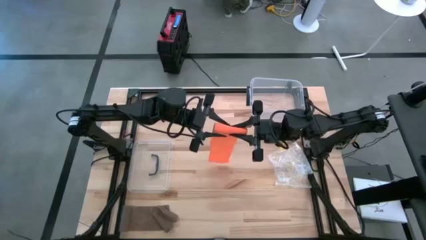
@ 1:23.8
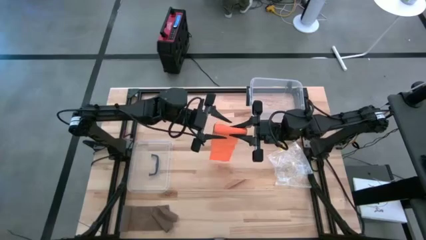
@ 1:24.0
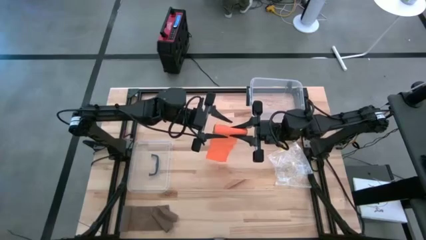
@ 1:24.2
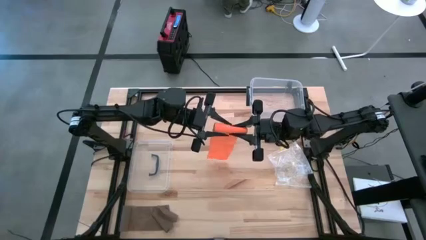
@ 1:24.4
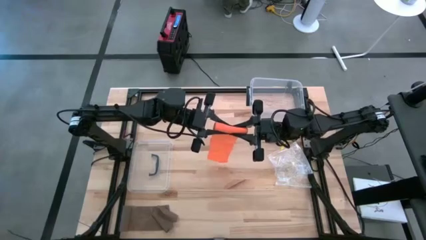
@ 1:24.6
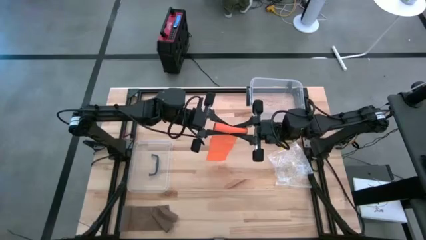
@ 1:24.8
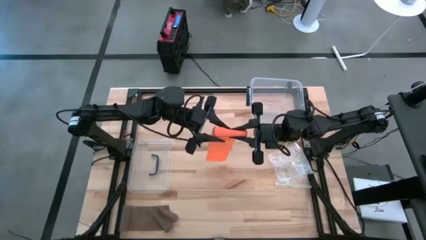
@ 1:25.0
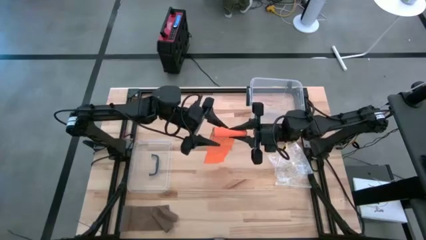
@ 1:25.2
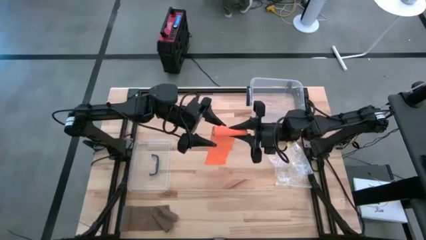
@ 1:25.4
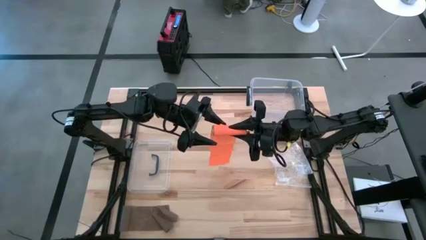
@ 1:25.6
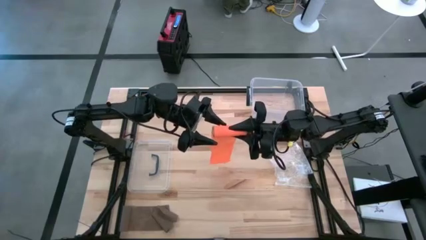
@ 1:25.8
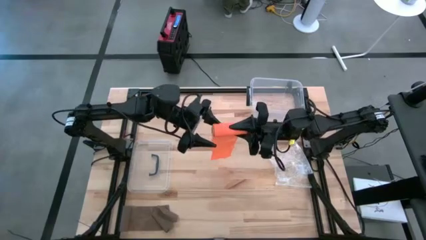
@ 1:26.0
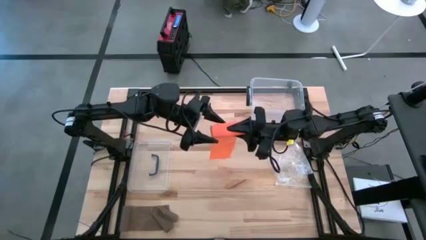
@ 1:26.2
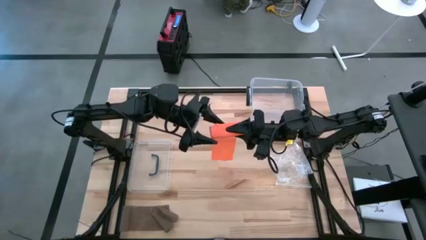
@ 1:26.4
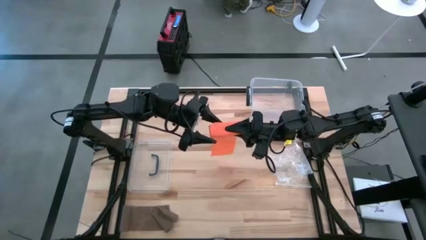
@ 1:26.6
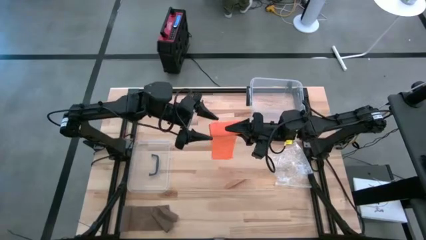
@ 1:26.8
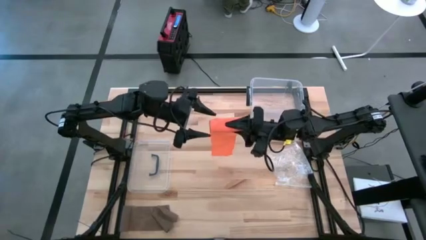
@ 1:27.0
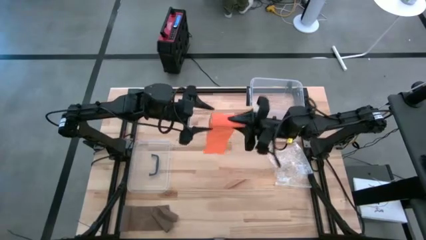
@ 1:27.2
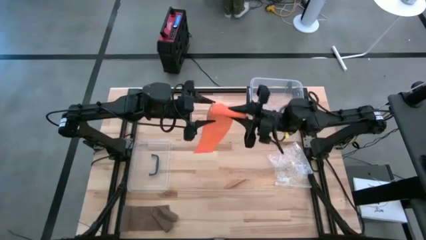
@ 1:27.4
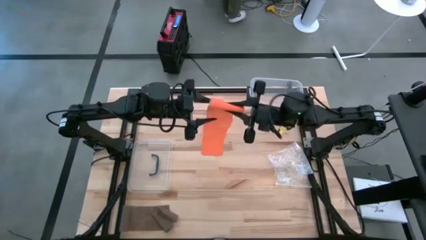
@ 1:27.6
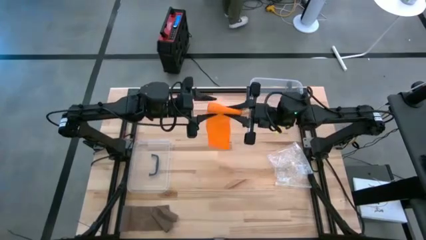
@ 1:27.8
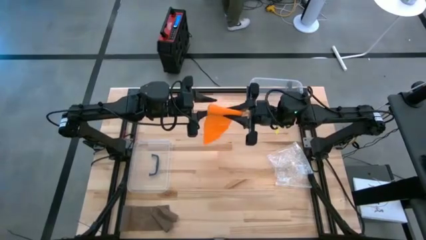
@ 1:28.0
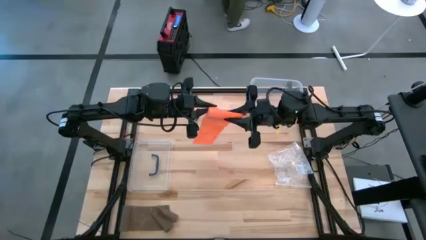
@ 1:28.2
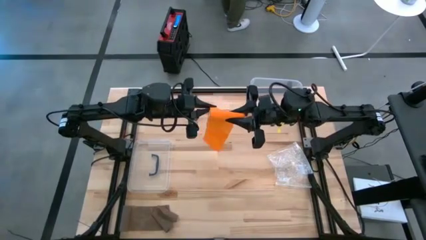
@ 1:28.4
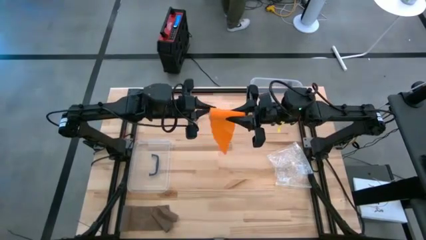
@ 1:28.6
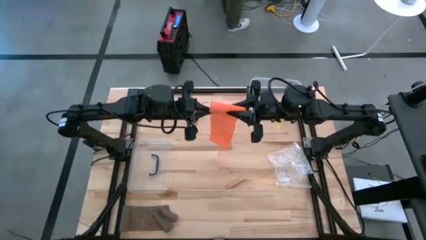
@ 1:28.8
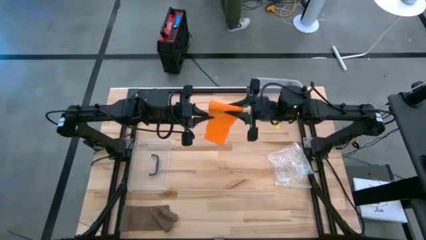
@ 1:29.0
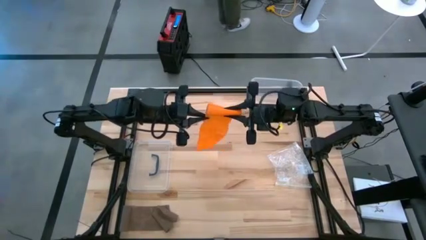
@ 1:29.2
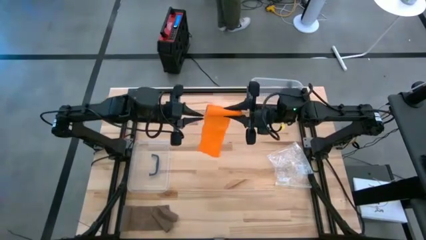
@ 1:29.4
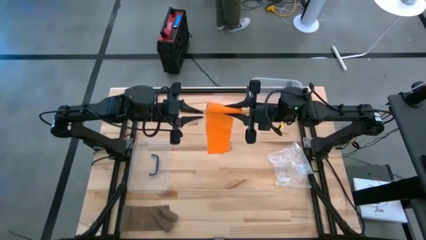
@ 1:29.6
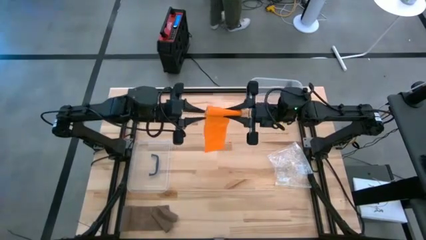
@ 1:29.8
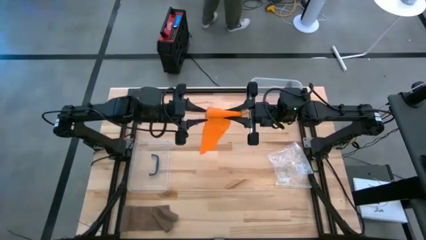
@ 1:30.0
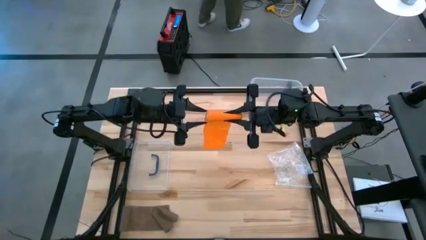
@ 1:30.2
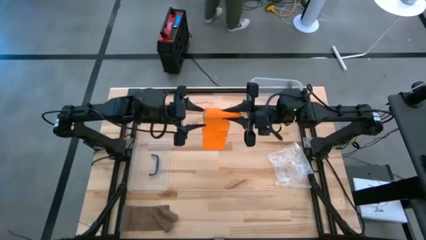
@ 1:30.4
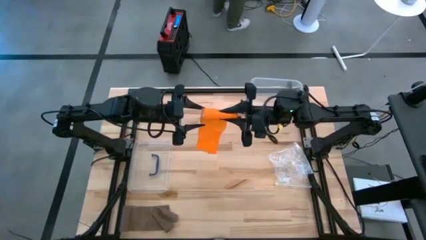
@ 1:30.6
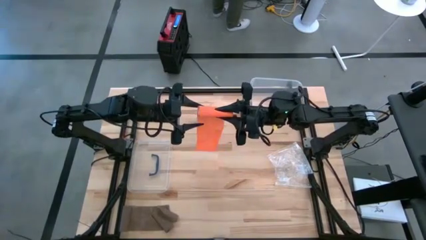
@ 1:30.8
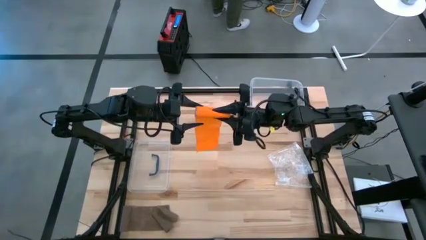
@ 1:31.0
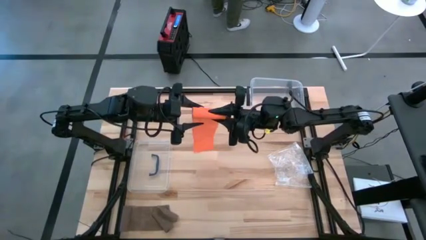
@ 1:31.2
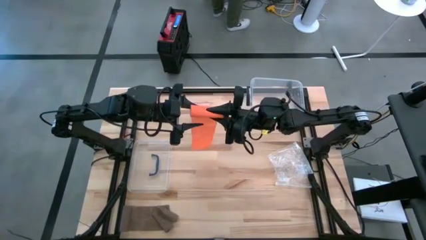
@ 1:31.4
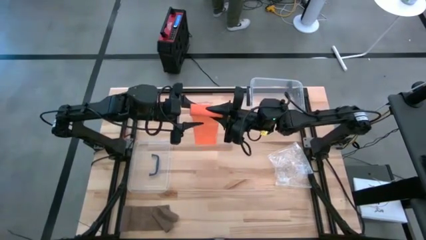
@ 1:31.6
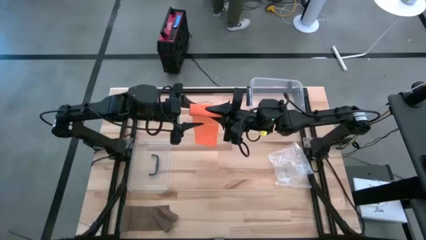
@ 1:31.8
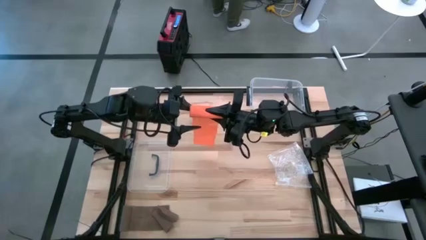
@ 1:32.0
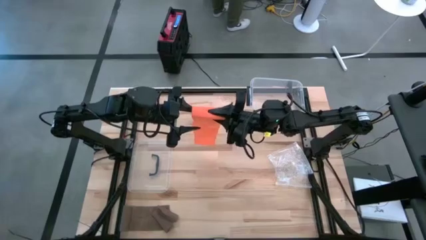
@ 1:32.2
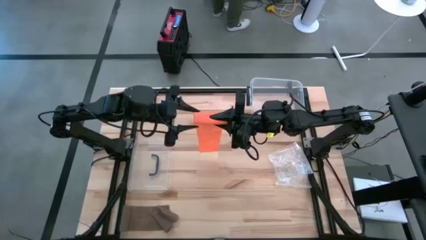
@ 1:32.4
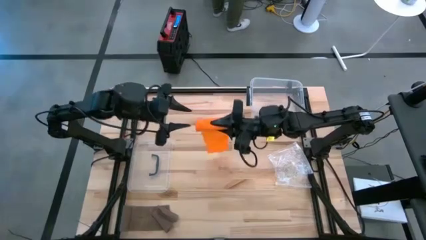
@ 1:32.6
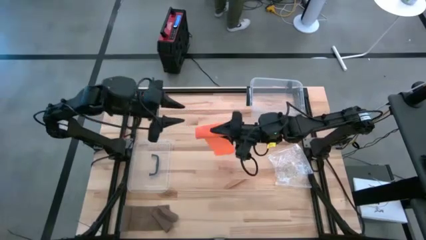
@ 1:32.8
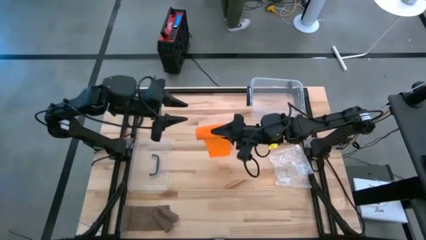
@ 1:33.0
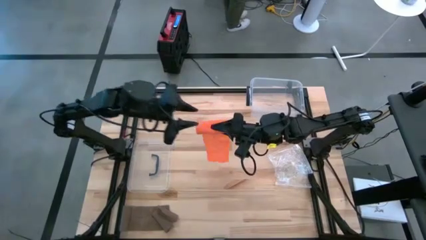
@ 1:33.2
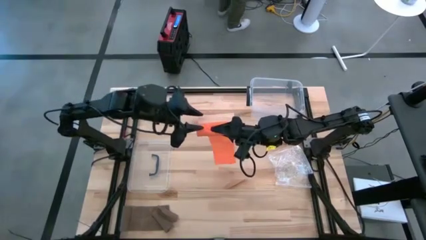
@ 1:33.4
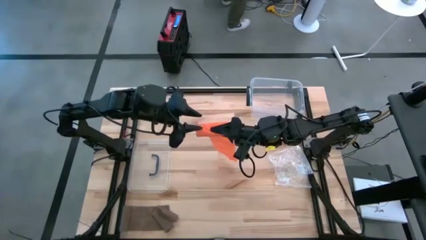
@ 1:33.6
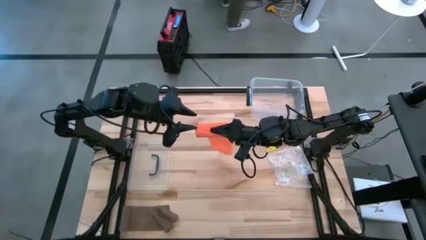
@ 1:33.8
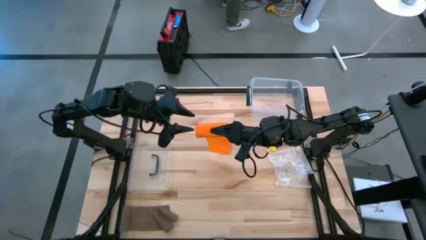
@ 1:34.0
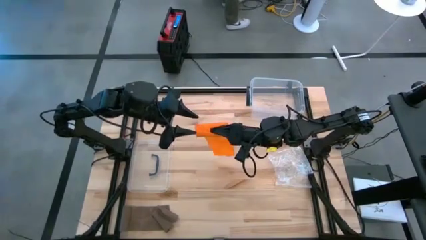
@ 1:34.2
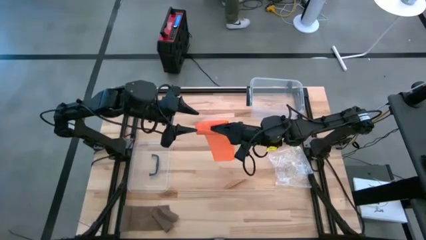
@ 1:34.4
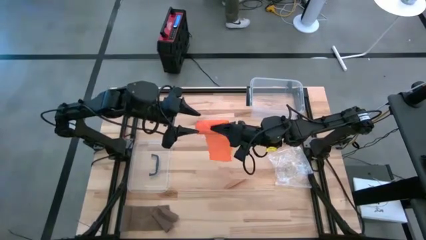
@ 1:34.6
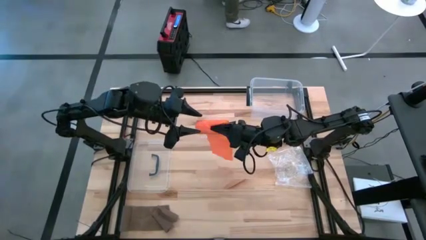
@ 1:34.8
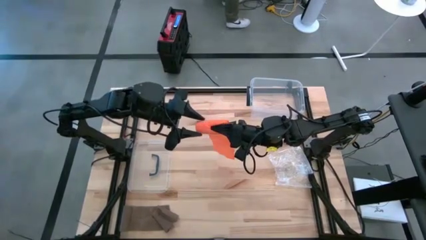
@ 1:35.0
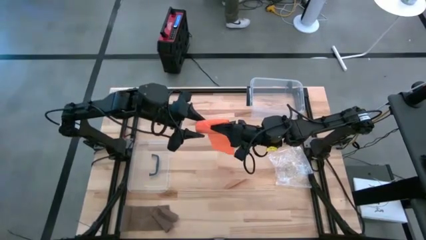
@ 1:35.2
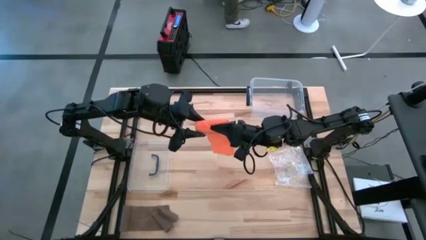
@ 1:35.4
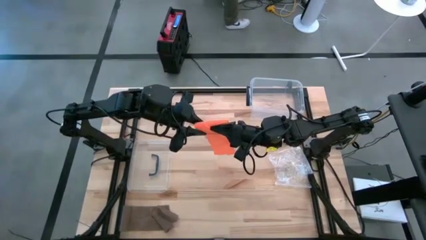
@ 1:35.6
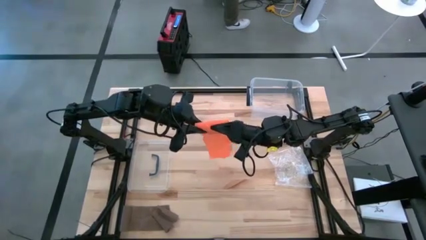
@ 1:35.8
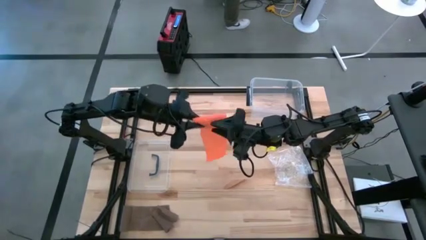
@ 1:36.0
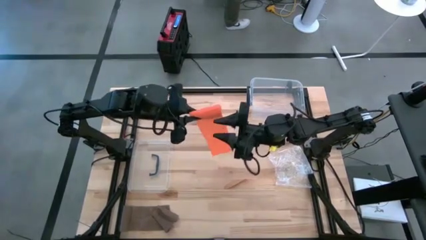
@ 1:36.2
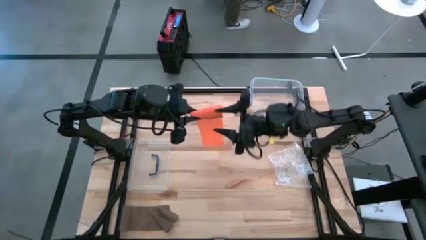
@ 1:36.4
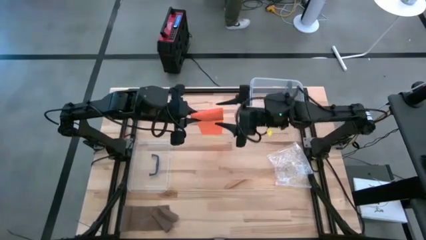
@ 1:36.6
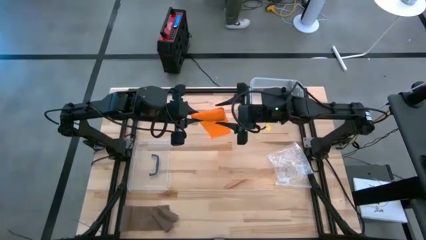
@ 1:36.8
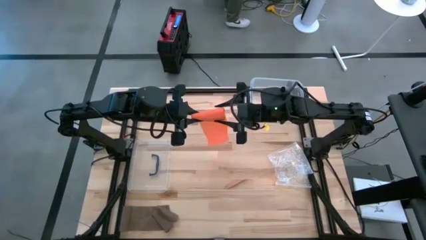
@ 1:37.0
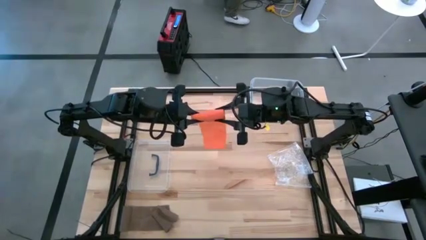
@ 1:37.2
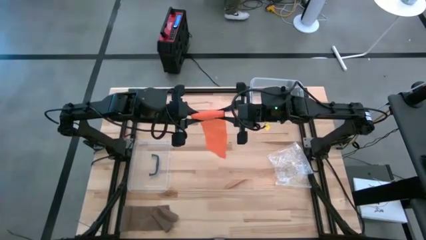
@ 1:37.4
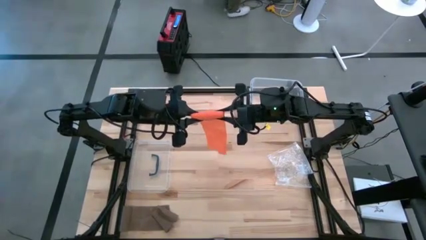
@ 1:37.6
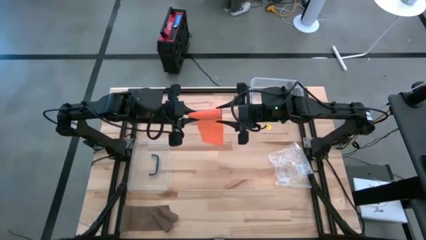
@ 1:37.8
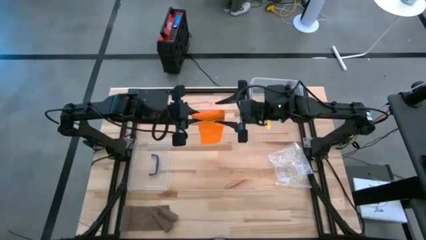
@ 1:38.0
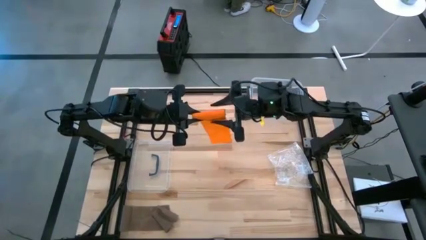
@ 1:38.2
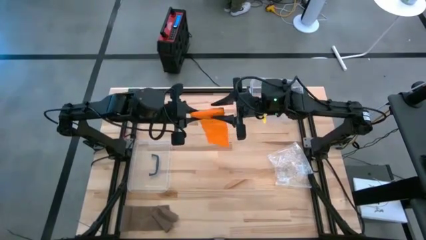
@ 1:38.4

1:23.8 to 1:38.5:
Task: Roll bandage
Roll the orange bandage

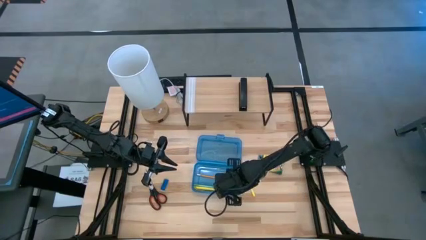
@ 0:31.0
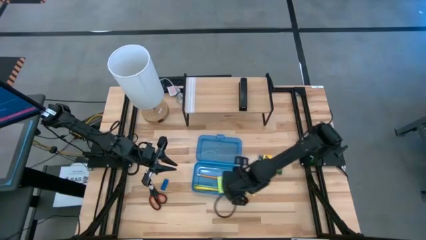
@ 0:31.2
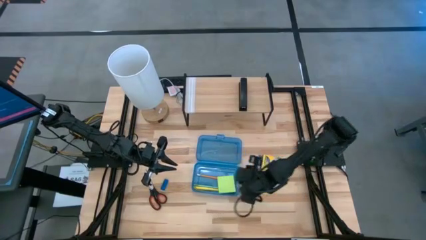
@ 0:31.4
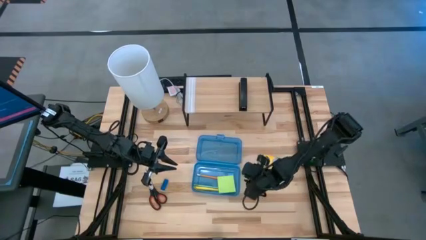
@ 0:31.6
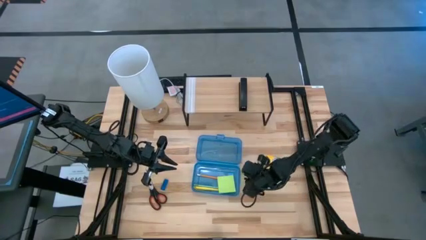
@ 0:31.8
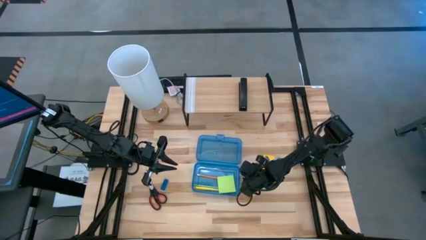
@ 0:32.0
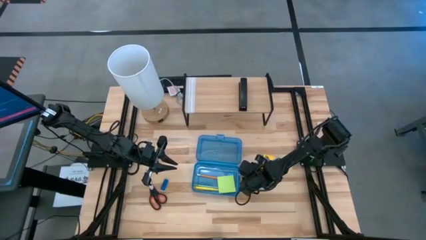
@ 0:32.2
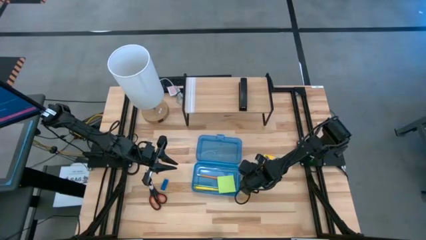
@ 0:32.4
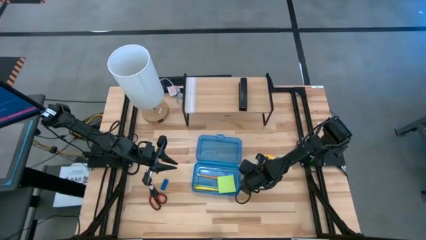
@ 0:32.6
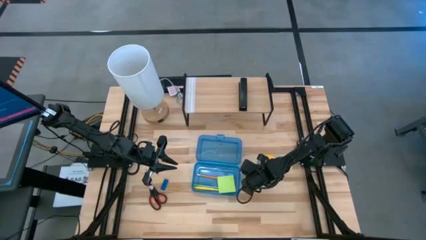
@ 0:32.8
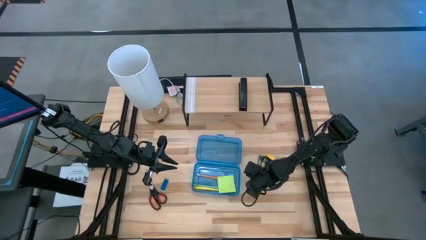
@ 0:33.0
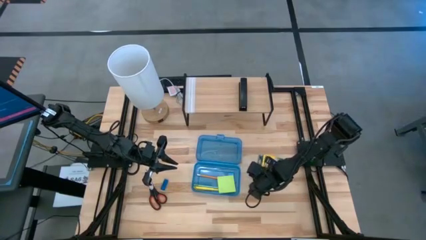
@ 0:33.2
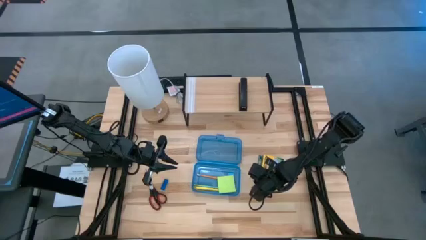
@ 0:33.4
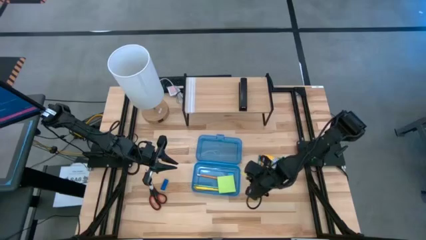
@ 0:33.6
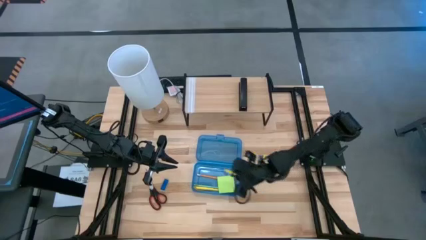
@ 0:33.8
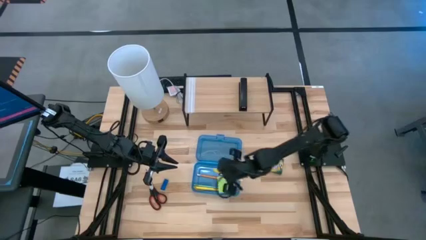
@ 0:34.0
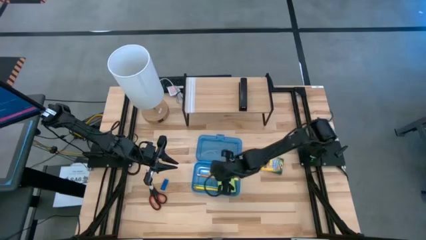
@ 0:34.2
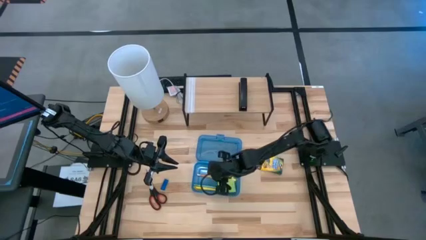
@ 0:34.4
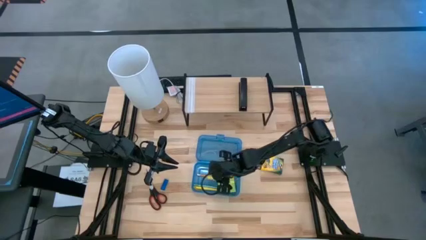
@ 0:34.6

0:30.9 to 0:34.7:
Task: Pack school essentials
Put the yellow pen into the blue supply box
